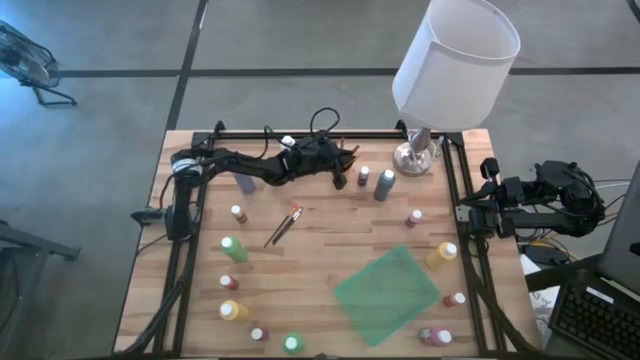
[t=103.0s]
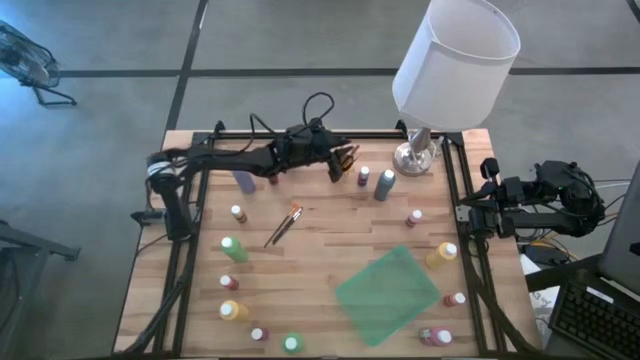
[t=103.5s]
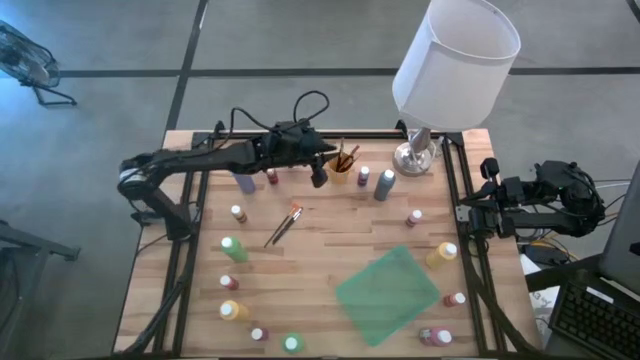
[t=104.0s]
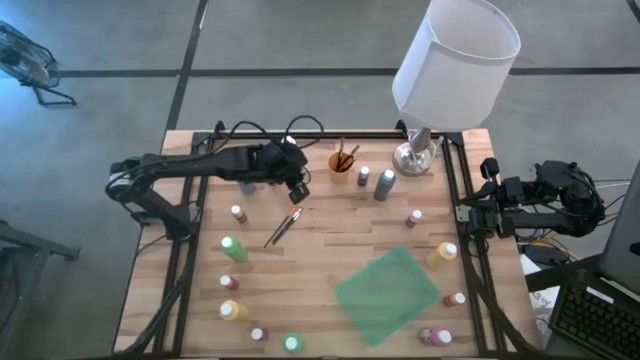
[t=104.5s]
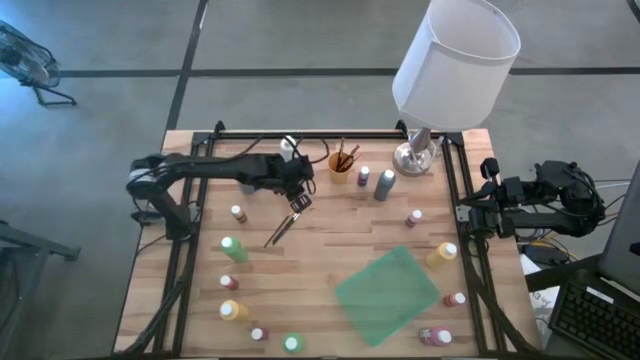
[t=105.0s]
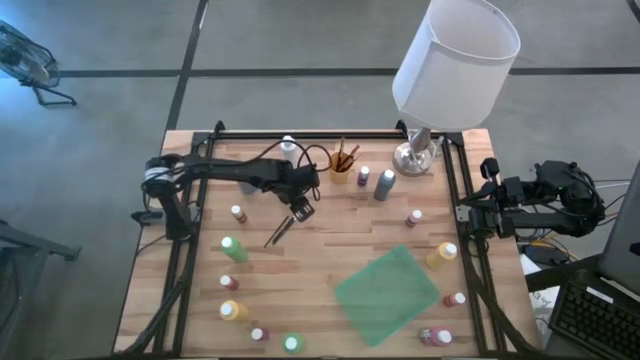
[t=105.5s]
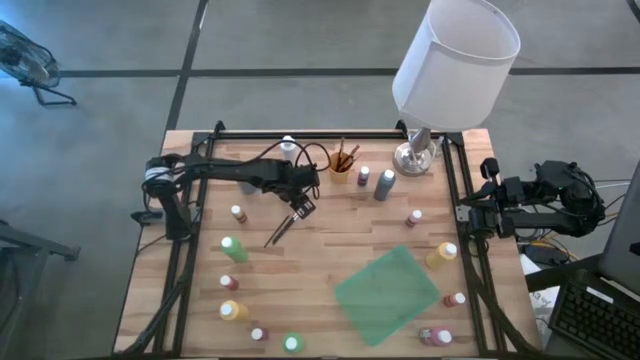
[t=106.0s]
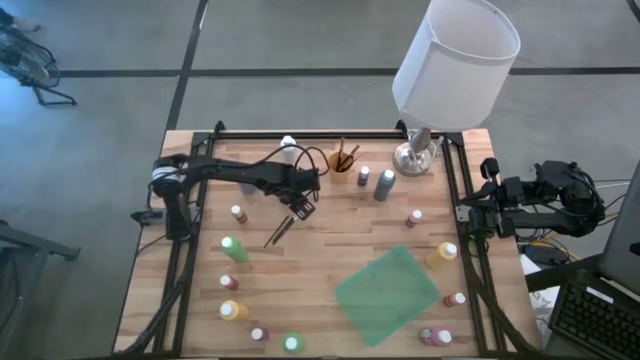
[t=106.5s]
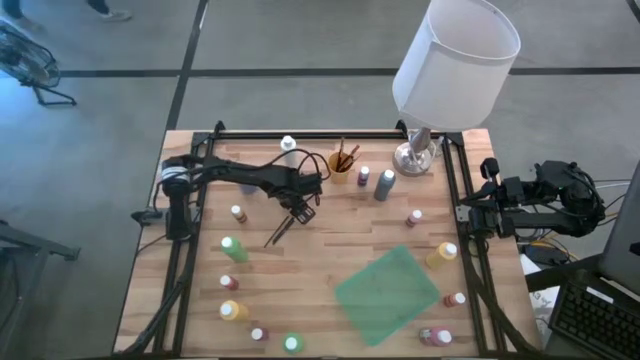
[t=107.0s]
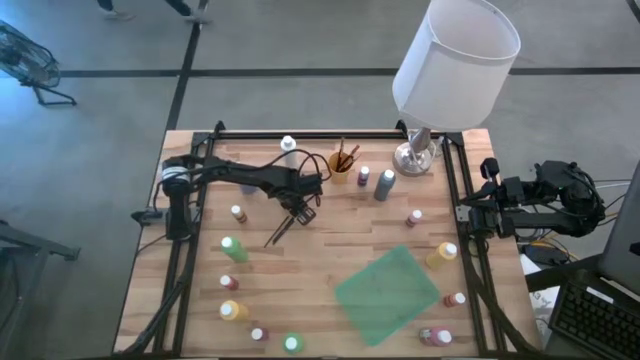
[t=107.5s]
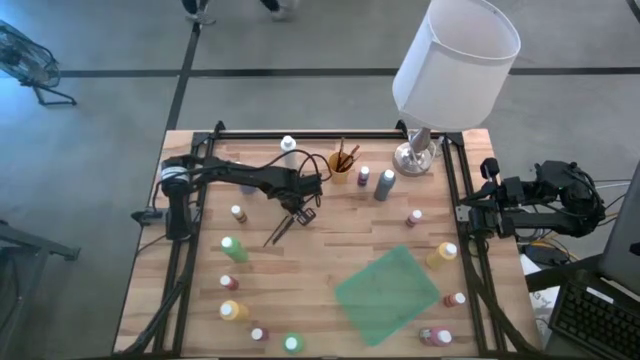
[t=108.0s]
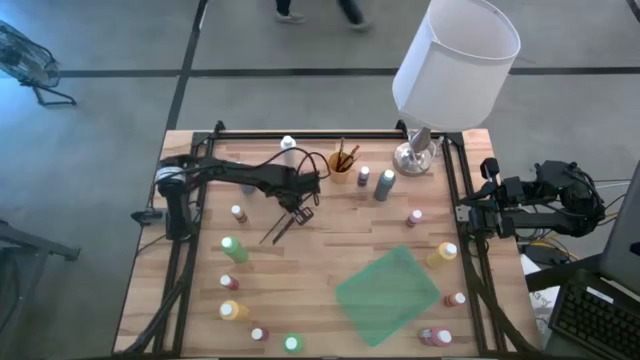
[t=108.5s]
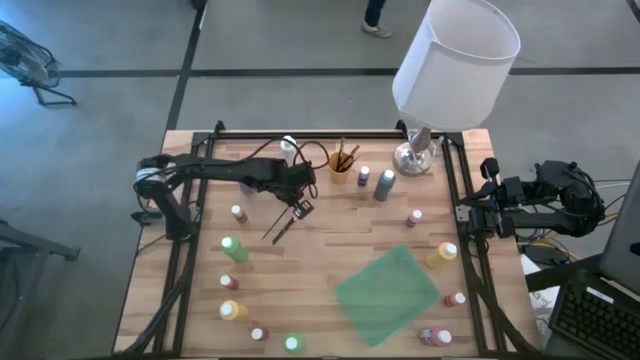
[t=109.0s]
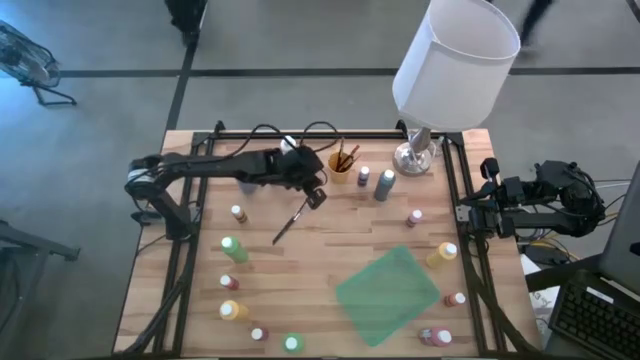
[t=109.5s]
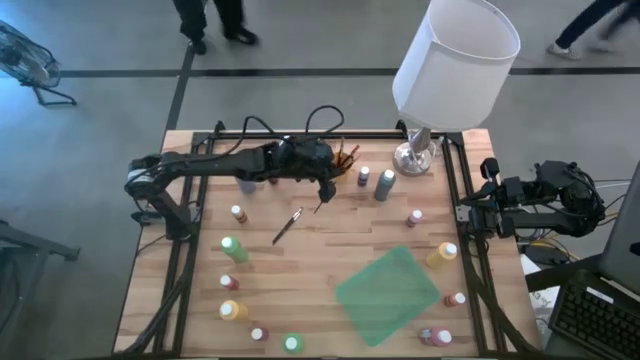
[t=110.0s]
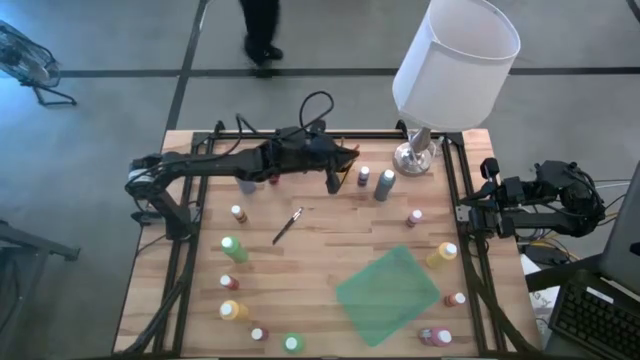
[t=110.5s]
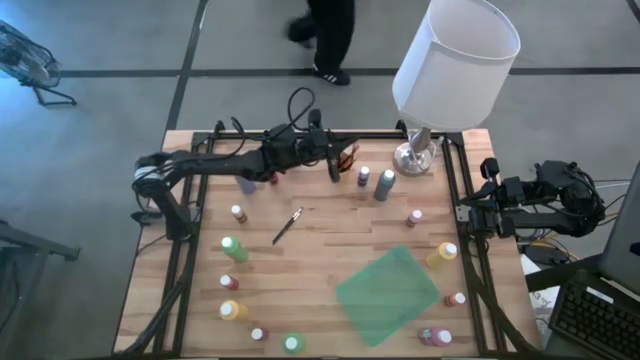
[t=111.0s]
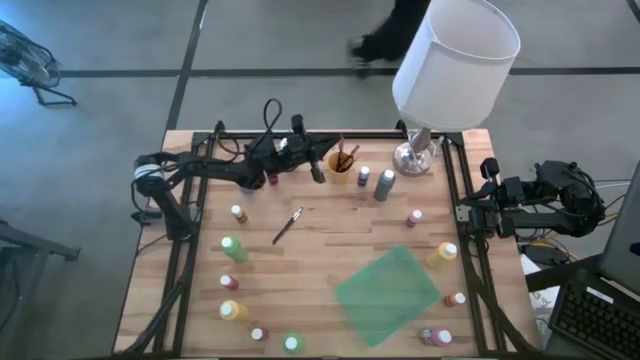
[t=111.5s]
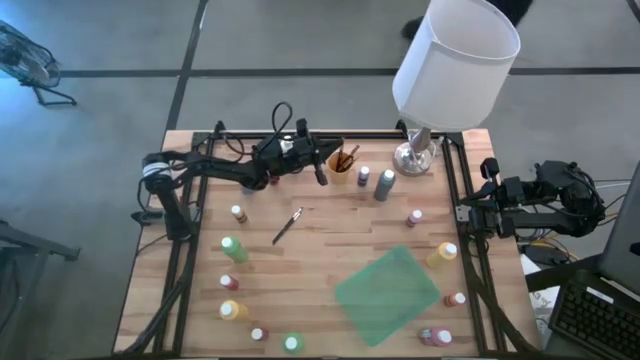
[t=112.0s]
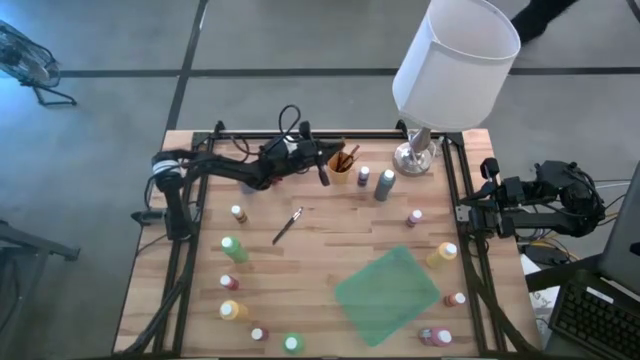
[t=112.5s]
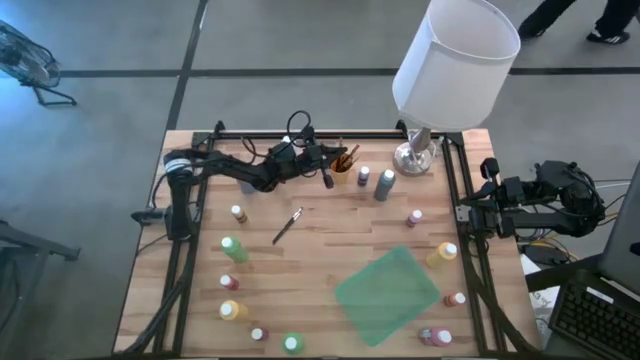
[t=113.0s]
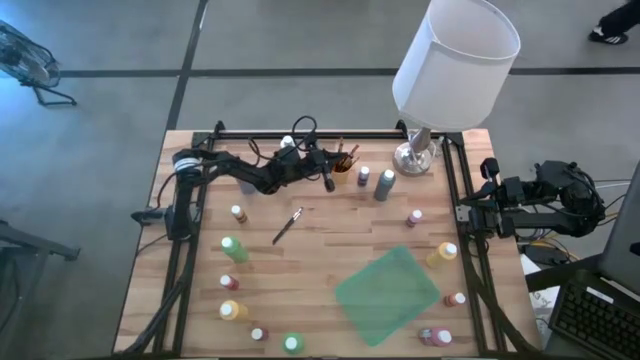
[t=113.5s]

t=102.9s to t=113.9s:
Task: Pick & Place Paint Supplies
Put the gold paintbrush into the yellow cup

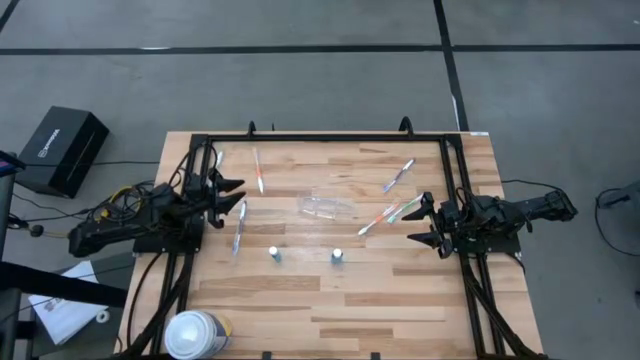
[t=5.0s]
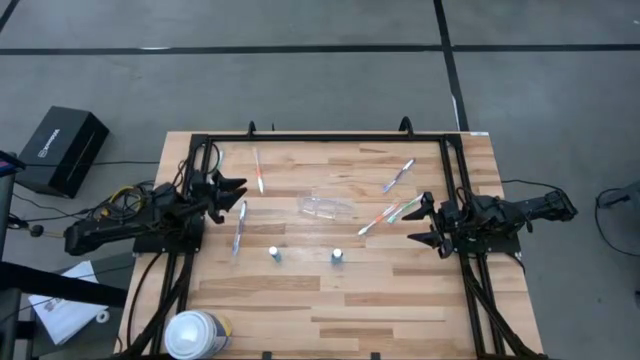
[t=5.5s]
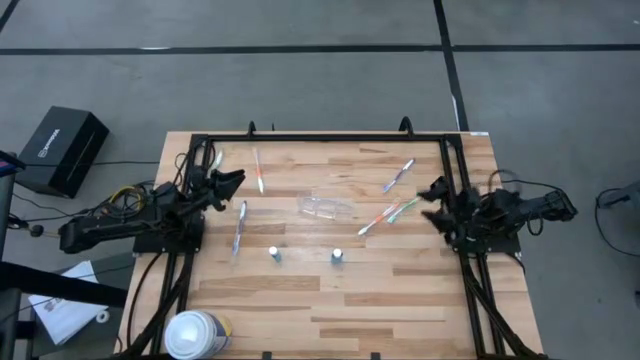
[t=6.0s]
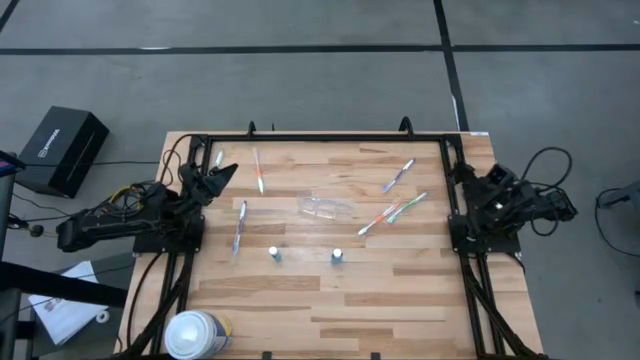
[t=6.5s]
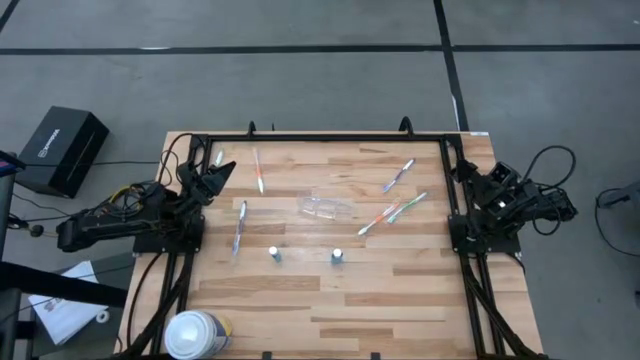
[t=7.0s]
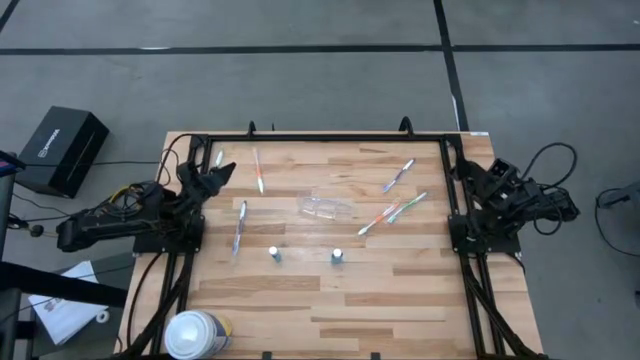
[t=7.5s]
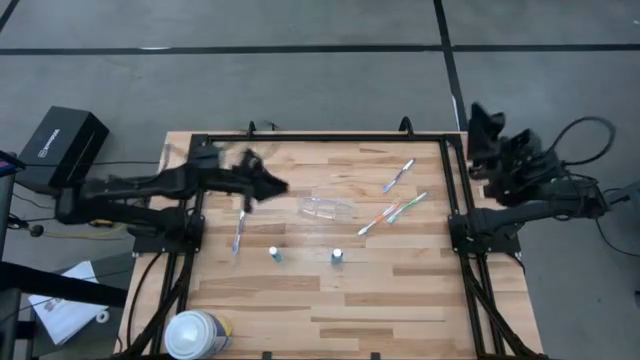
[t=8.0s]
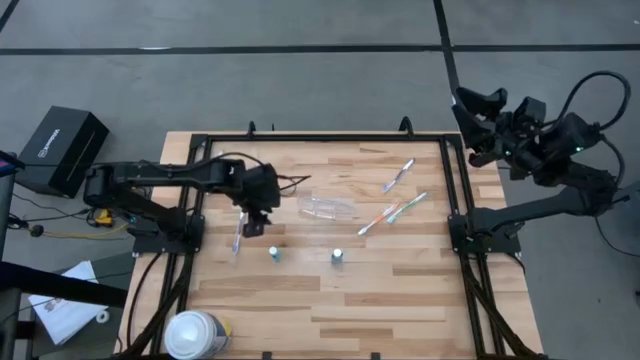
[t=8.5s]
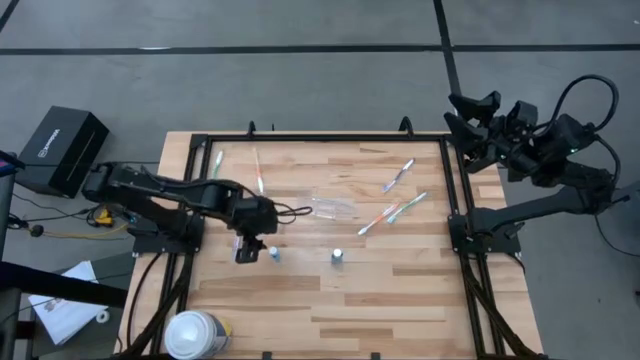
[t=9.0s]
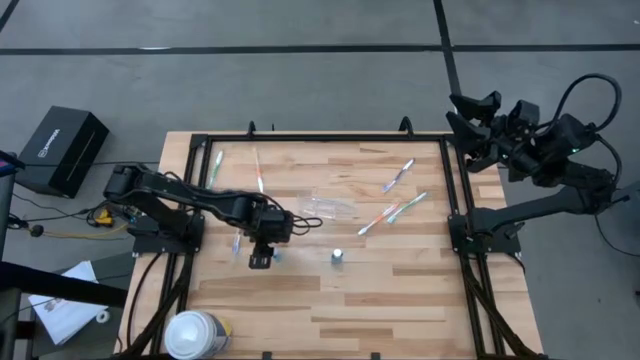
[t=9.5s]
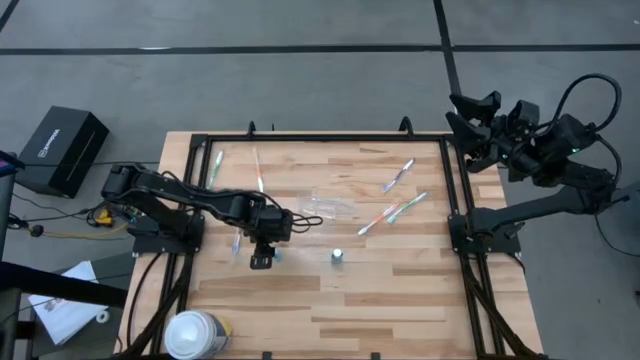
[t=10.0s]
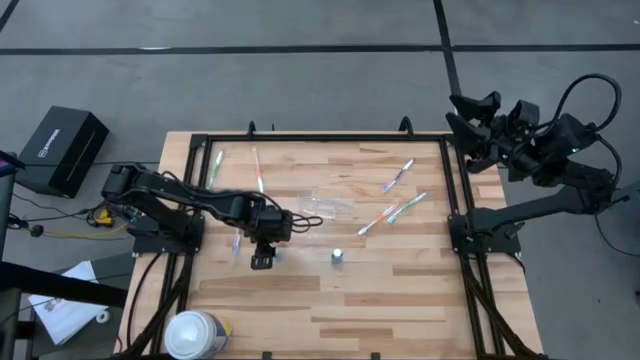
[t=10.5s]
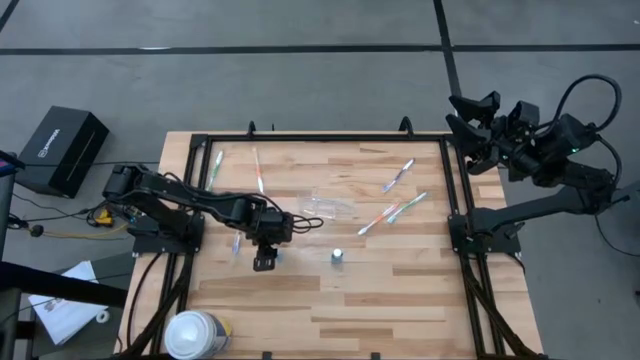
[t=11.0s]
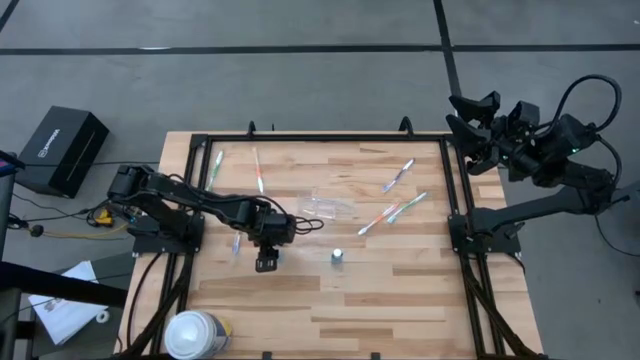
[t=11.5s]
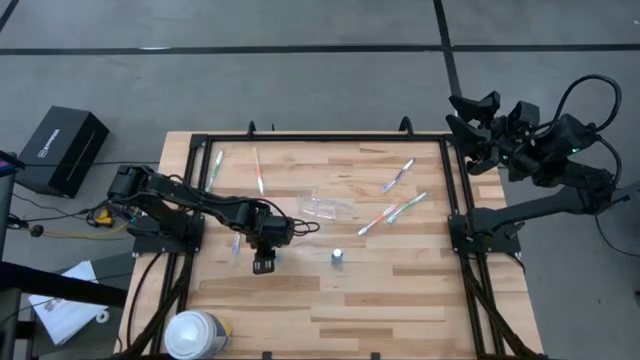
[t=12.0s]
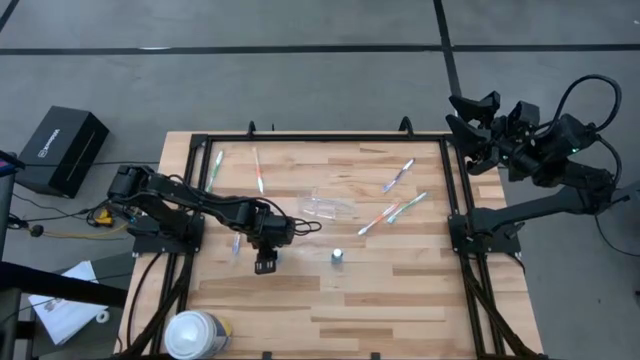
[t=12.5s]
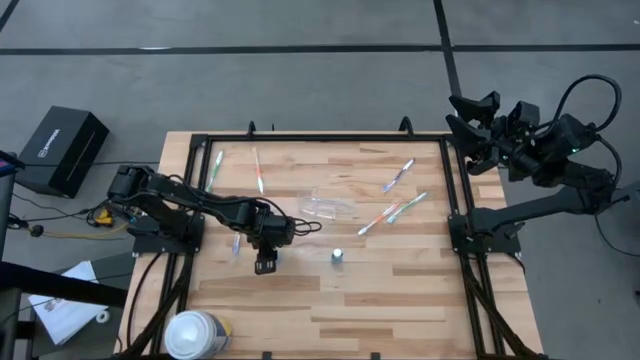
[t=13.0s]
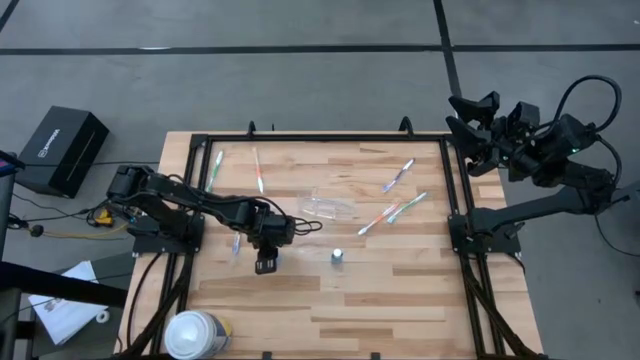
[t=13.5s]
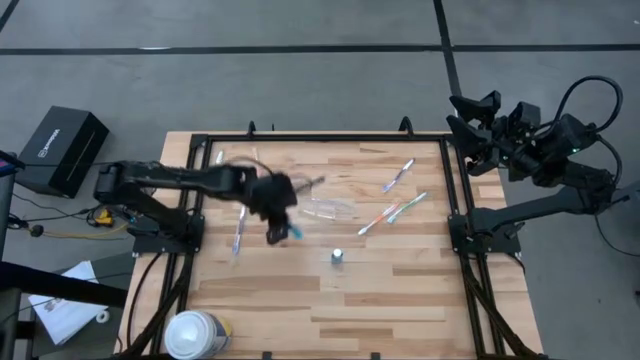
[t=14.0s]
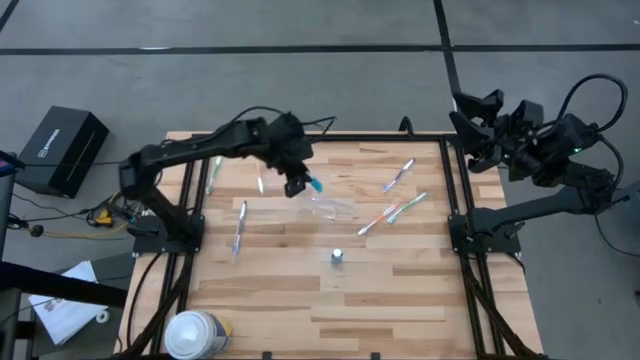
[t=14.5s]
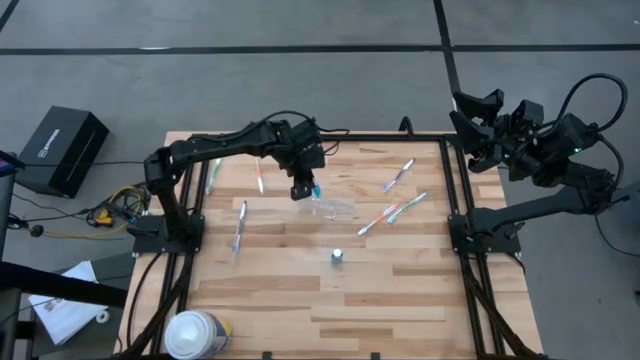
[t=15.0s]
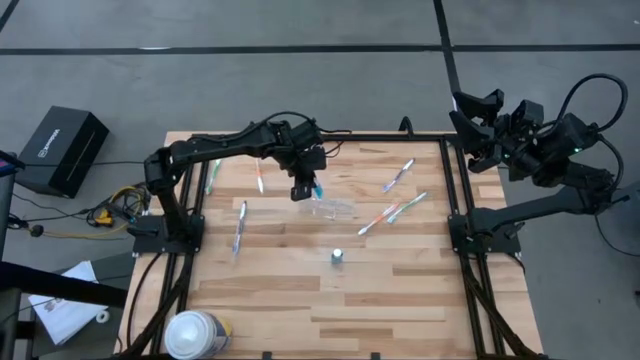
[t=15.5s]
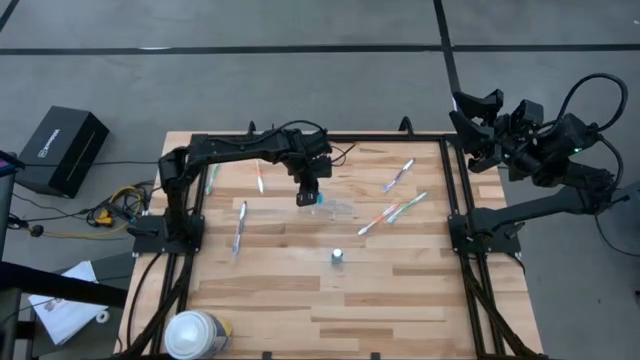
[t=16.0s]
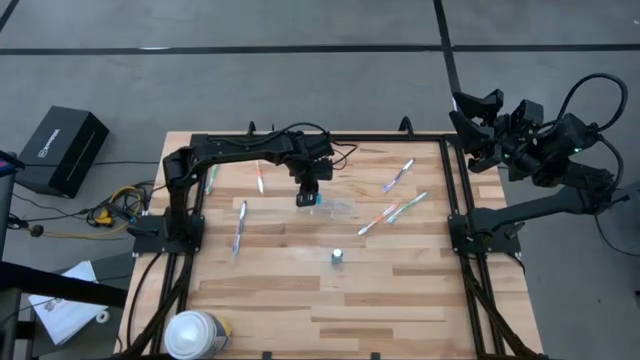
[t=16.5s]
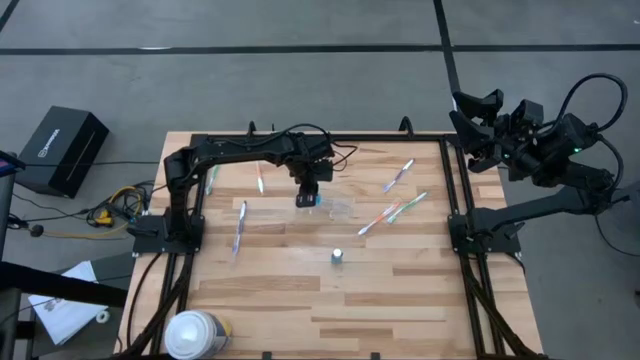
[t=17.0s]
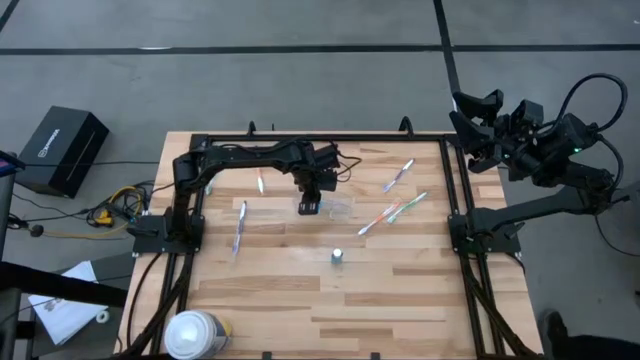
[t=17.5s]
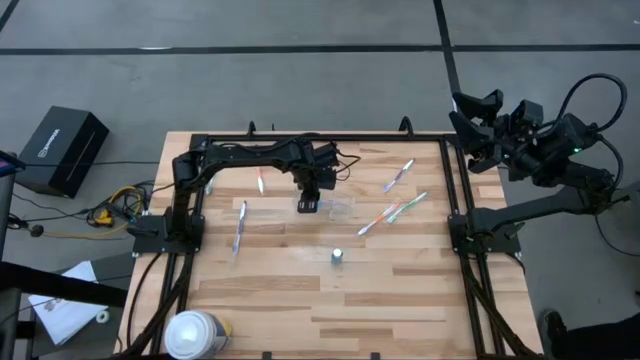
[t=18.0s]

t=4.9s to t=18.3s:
Task: Pick & Place toothbrushing station
Put the left blue mouthwash into the transparent organizer
